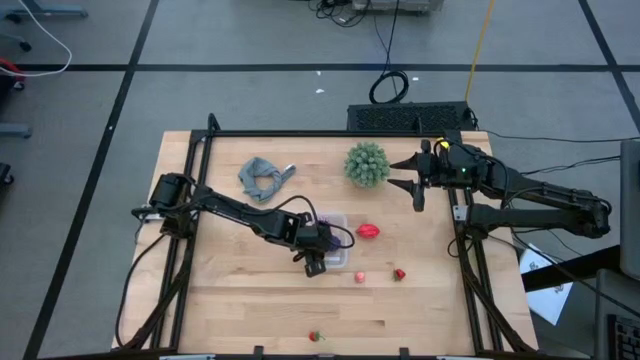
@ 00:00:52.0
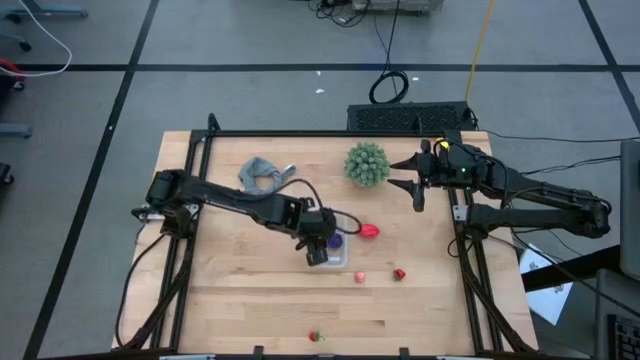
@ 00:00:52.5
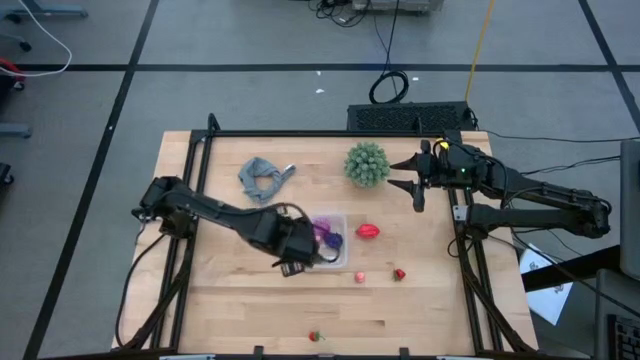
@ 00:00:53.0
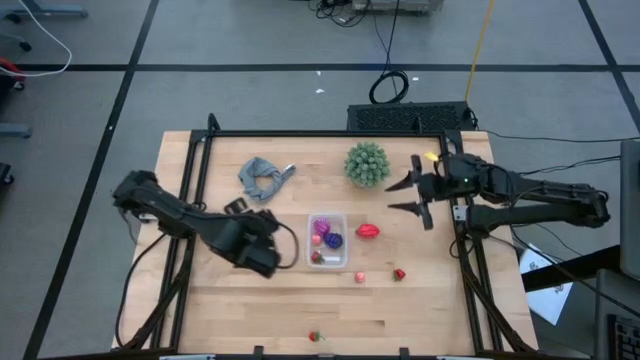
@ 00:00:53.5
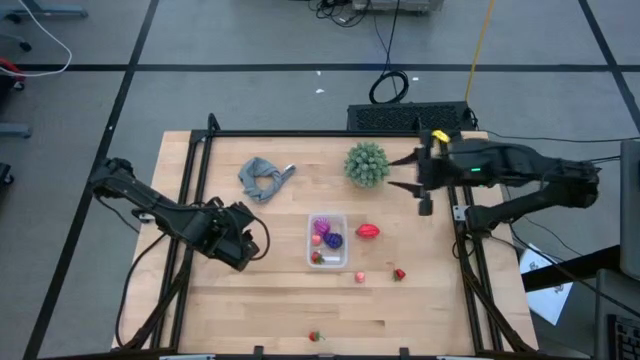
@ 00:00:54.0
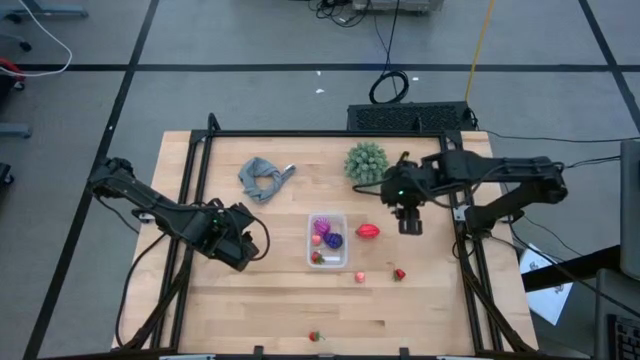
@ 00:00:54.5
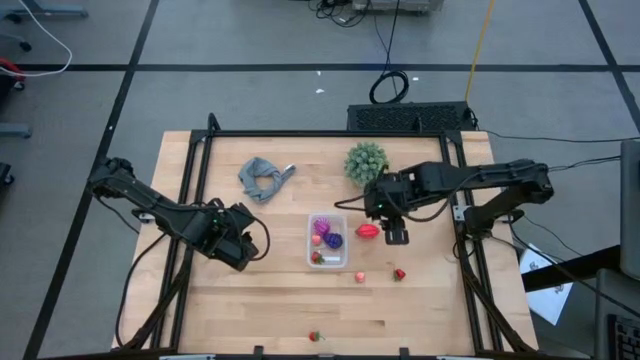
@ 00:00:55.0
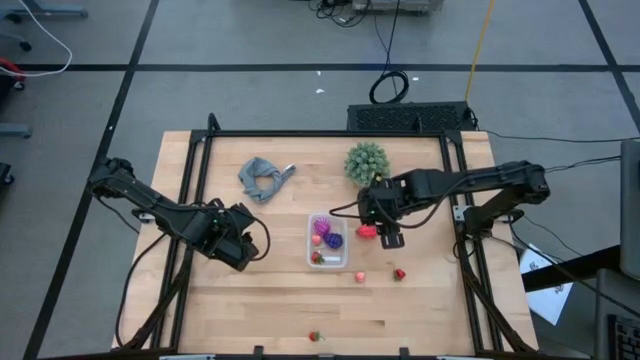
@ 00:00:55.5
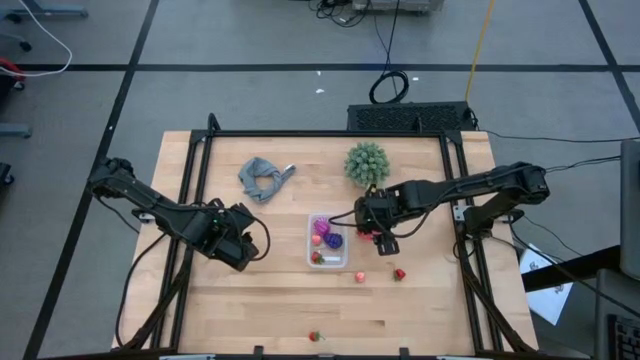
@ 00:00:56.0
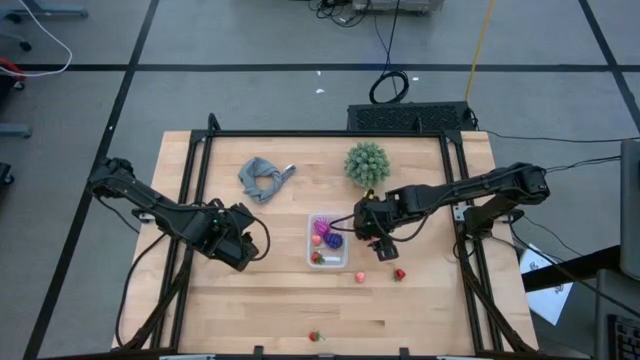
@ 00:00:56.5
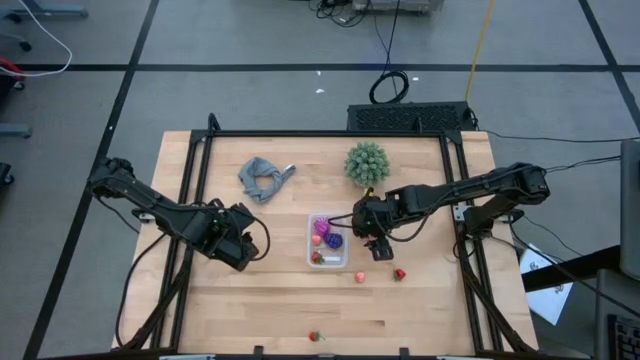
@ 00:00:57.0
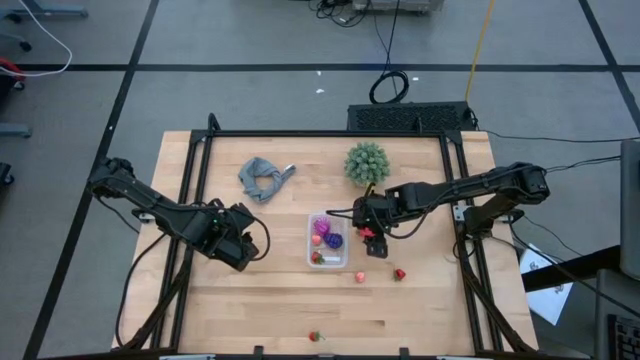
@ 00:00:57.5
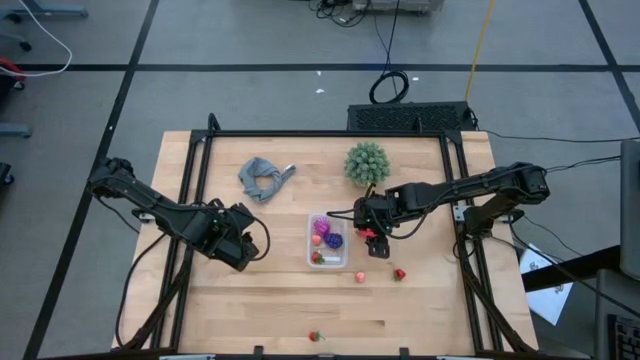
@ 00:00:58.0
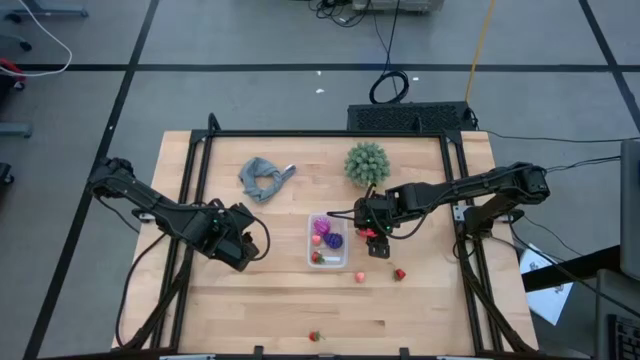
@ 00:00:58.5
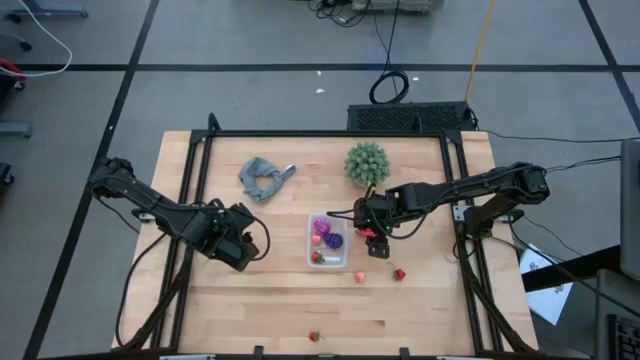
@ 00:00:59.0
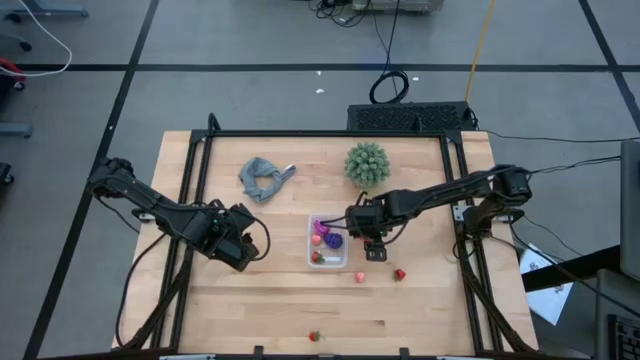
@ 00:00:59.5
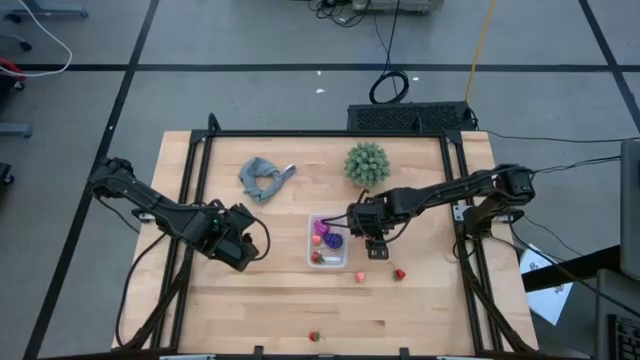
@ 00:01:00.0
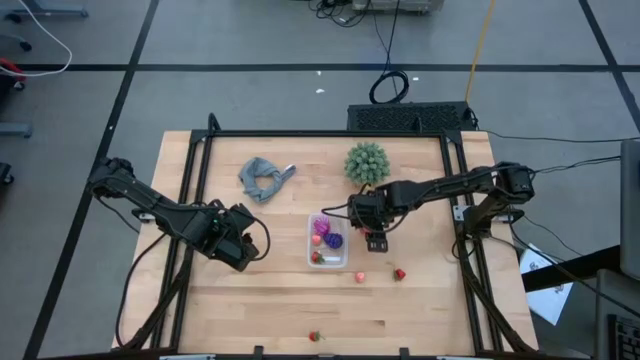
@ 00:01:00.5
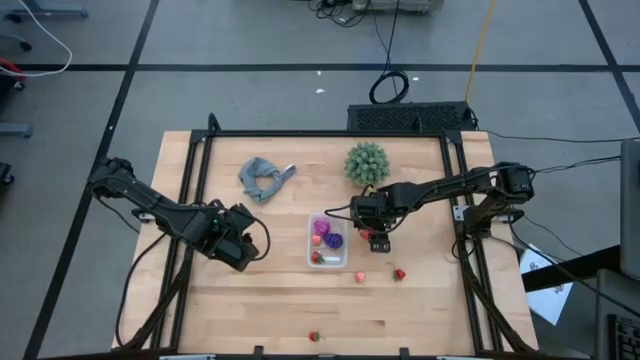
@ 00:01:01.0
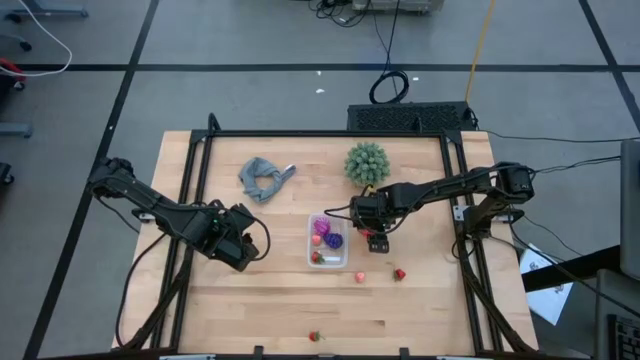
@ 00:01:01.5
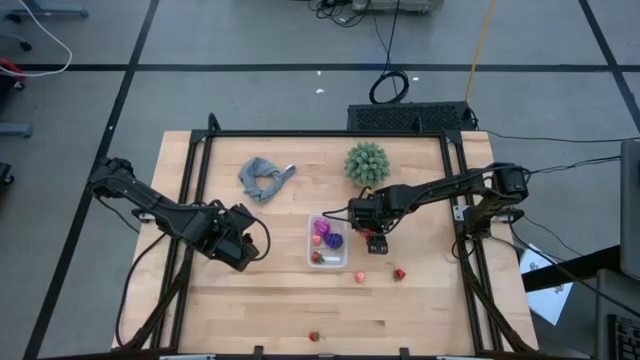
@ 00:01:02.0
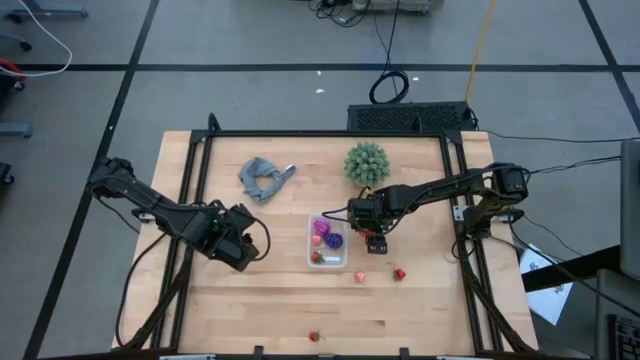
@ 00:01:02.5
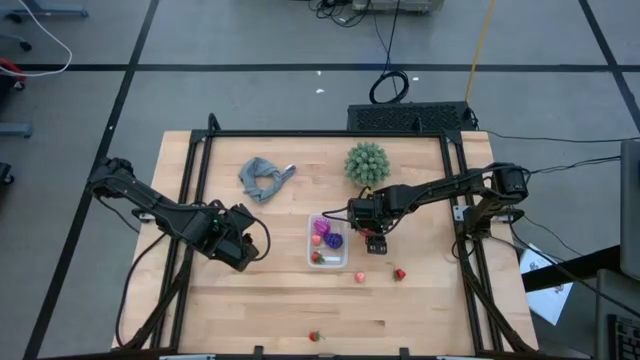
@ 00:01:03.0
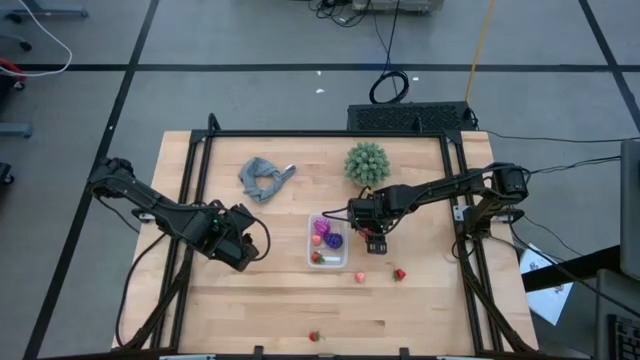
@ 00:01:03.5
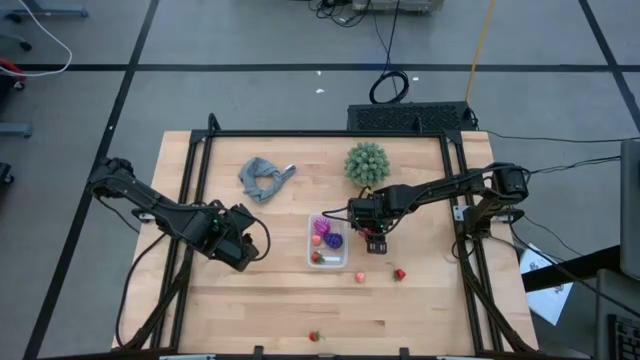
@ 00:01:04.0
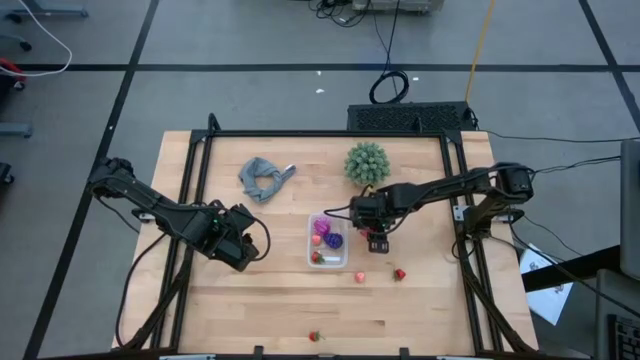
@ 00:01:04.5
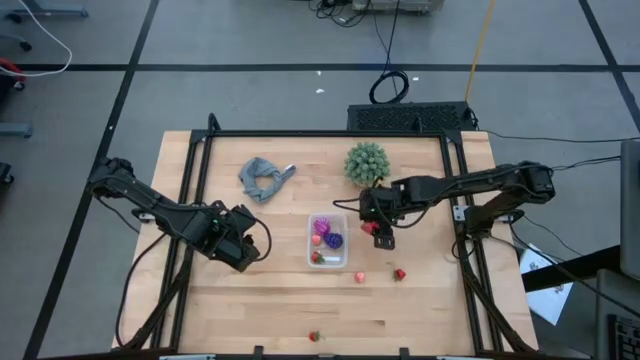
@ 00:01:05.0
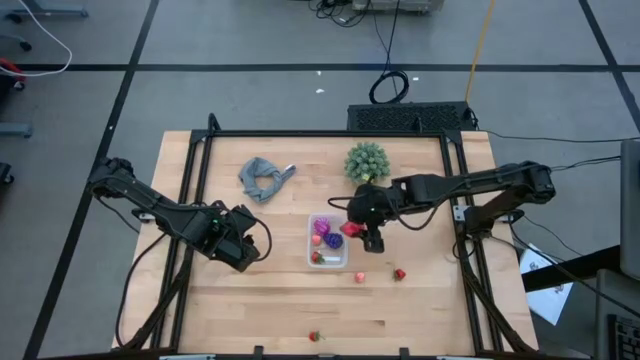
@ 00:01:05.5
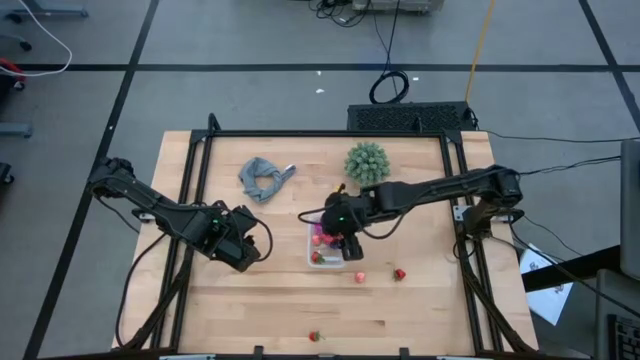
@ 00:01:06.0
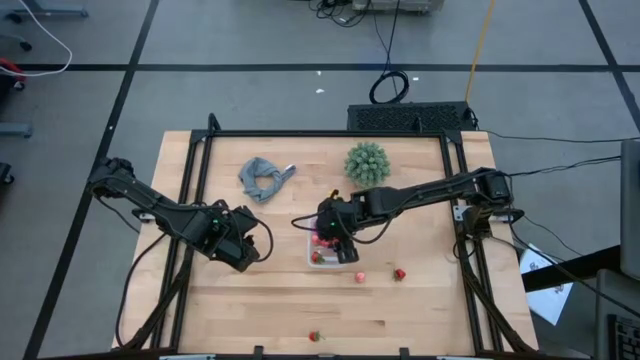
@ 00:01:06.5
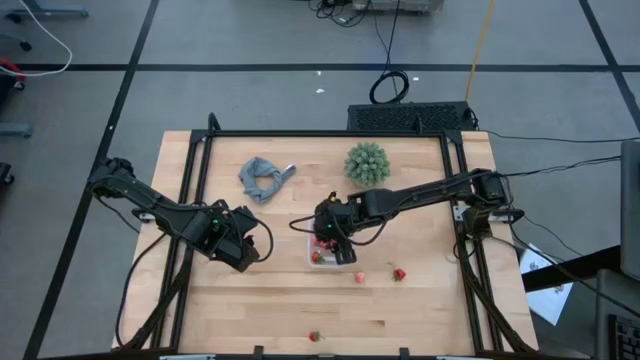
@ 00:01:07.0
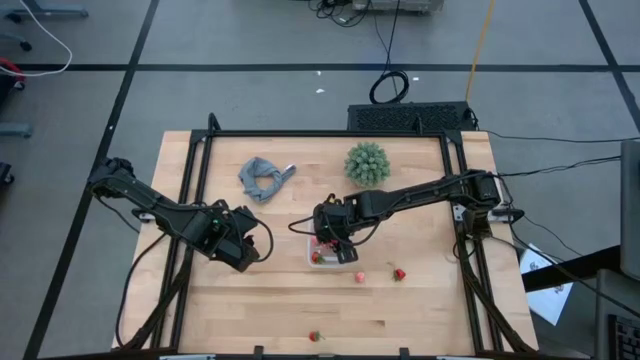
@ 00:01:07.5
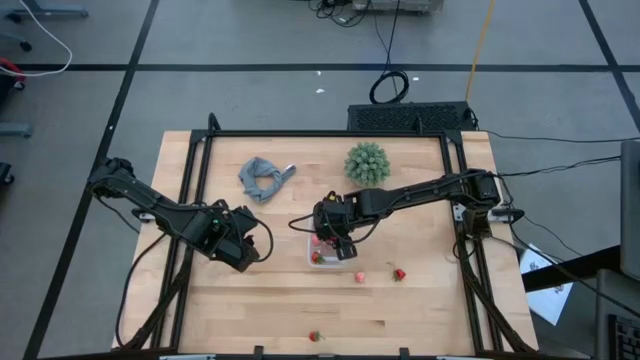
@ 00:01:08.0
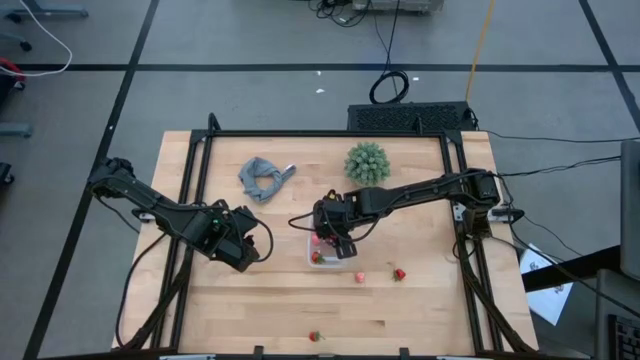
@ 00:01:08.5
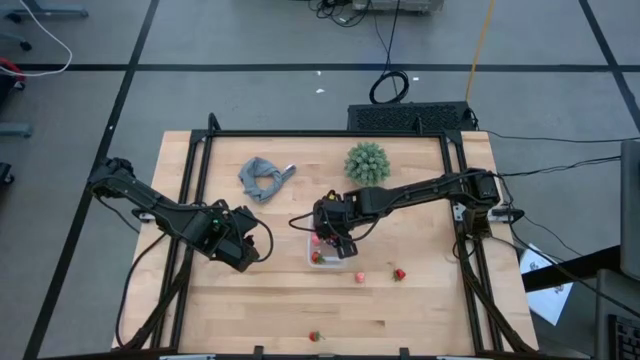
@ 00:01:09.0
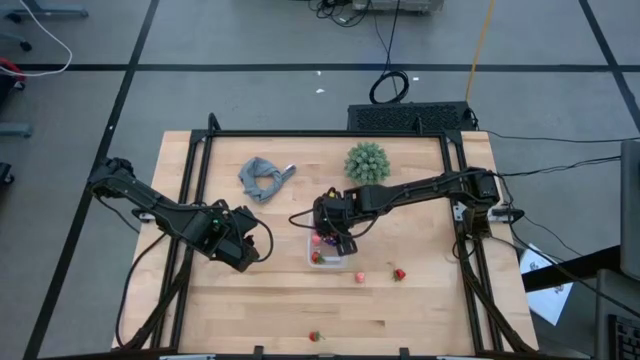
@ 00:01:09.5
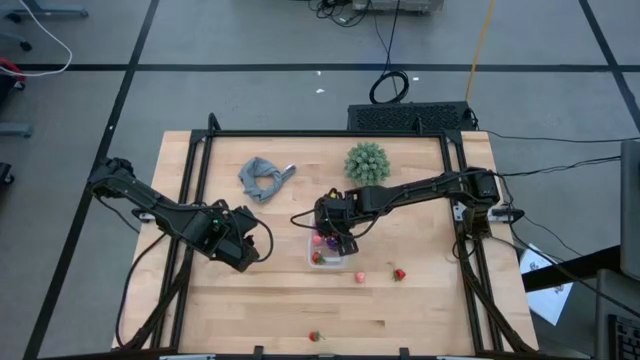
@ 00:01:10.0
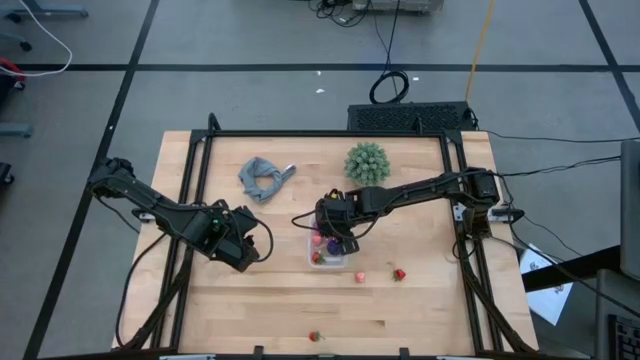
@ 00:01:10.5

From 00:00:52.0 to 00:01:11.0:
Task: Pick and placing Produce into tupperware
Put the dragonfruit into the transparent bin
